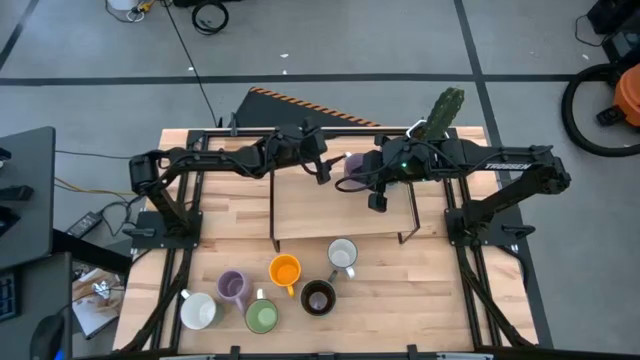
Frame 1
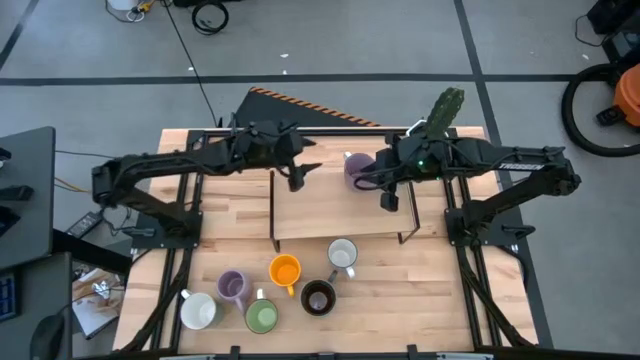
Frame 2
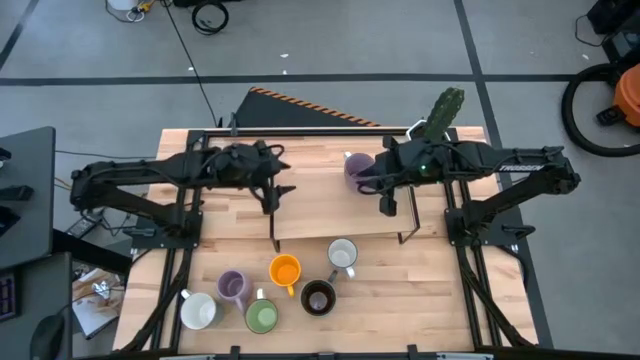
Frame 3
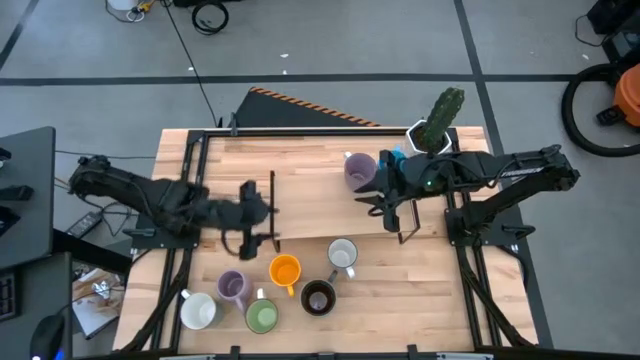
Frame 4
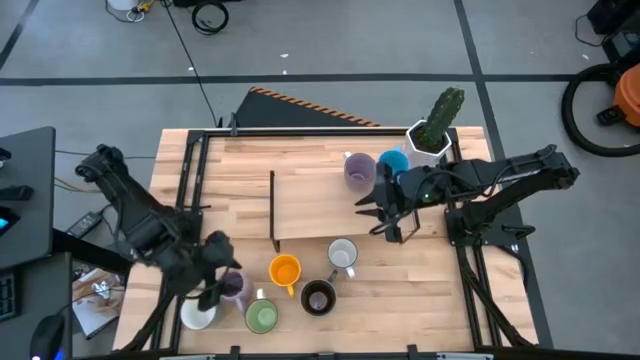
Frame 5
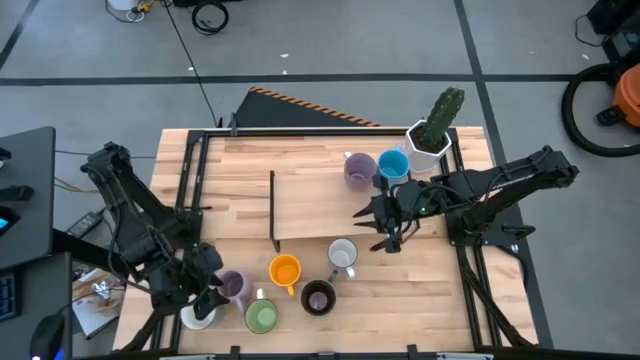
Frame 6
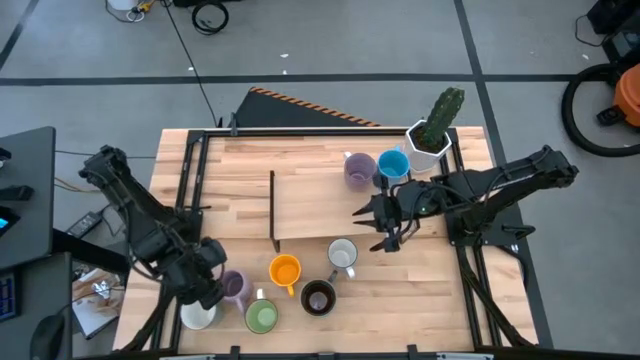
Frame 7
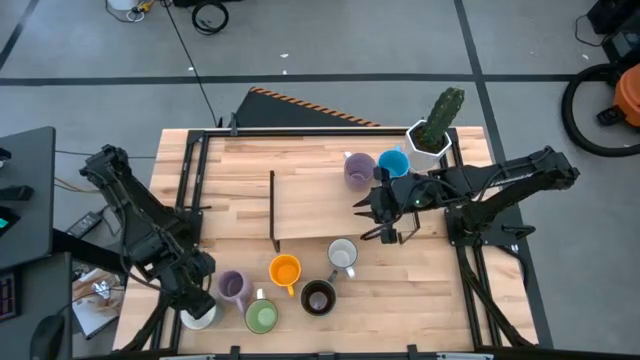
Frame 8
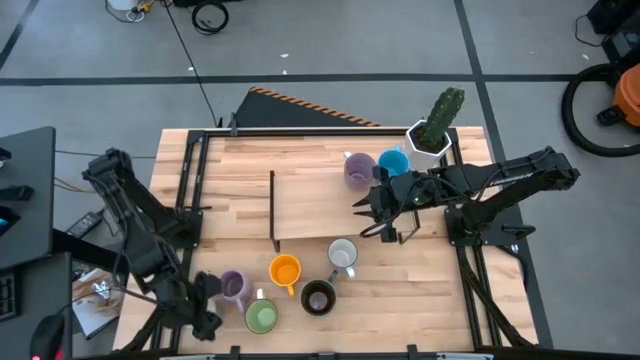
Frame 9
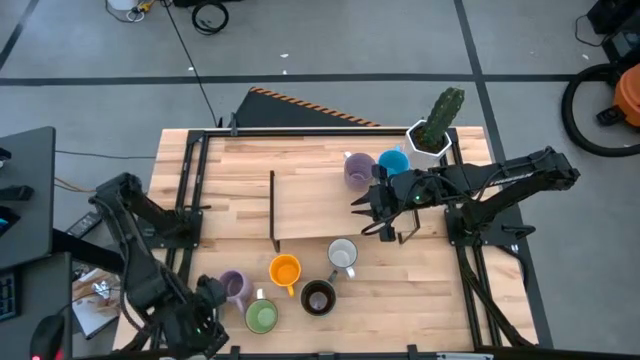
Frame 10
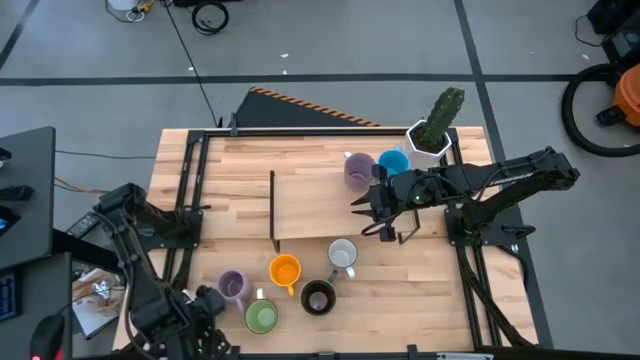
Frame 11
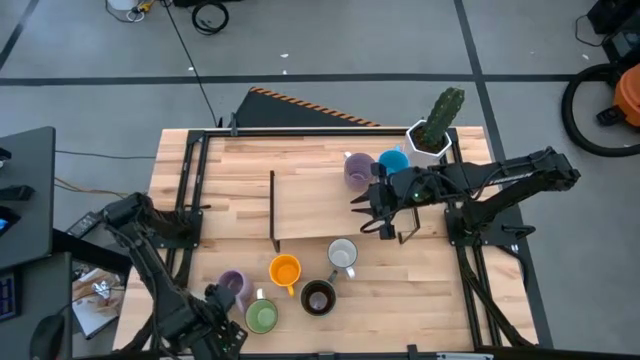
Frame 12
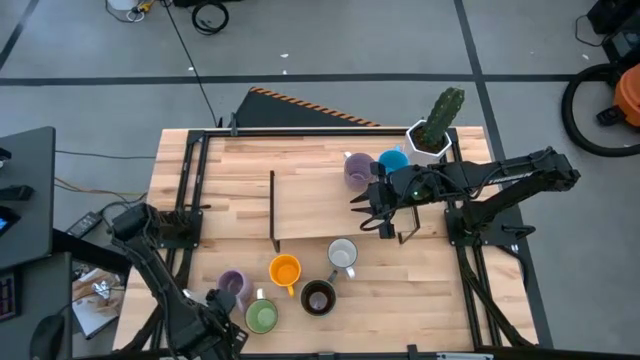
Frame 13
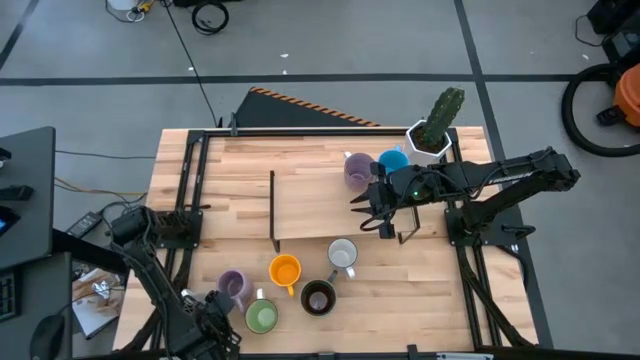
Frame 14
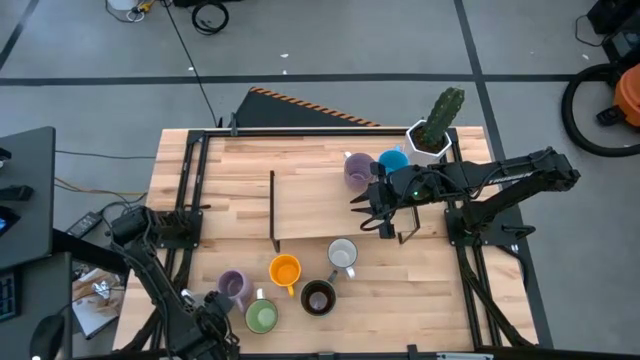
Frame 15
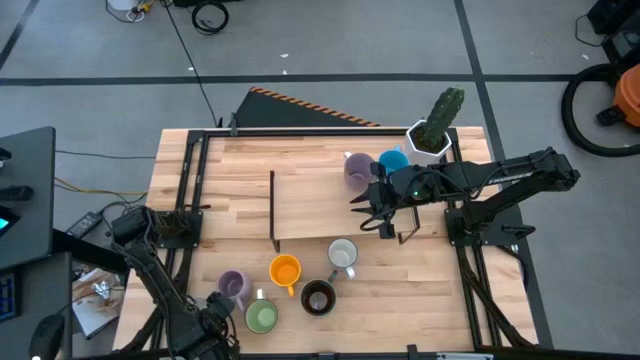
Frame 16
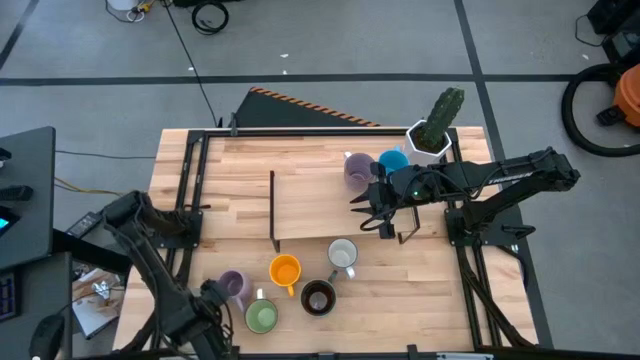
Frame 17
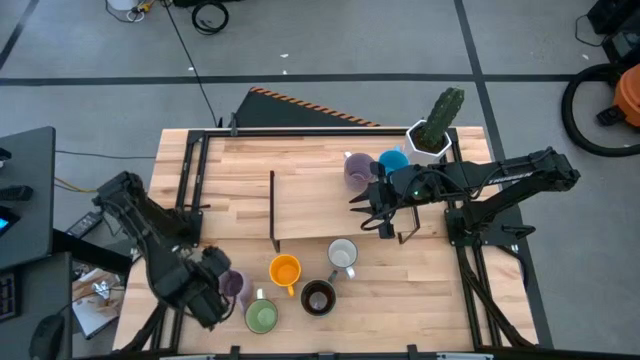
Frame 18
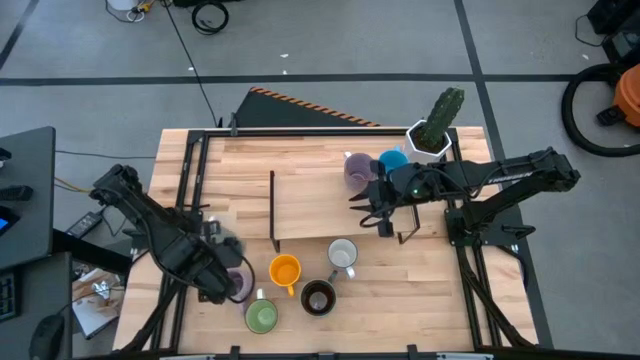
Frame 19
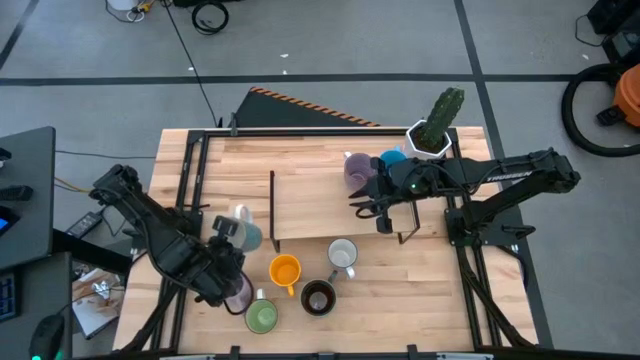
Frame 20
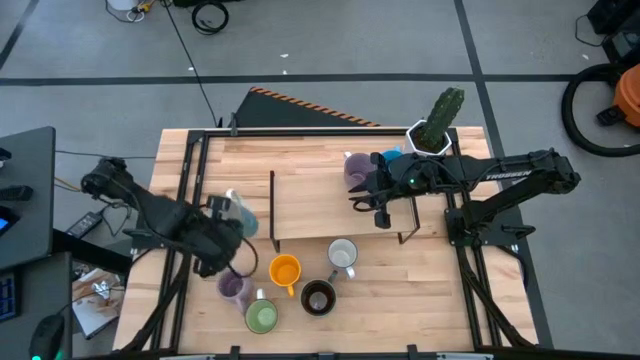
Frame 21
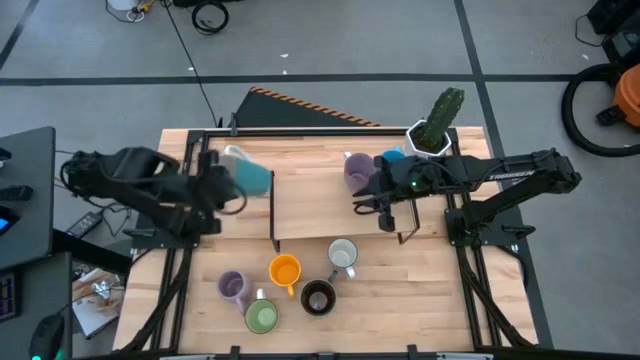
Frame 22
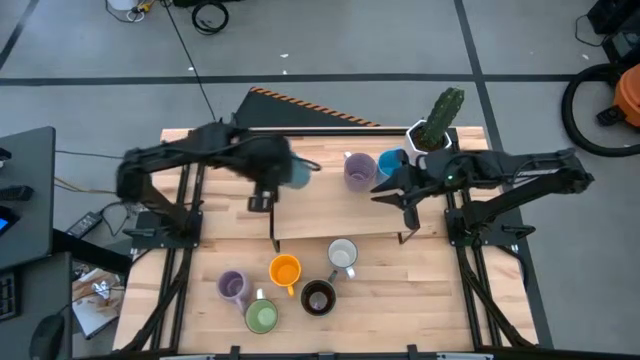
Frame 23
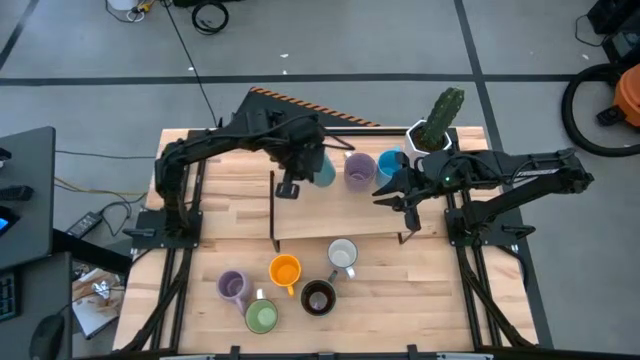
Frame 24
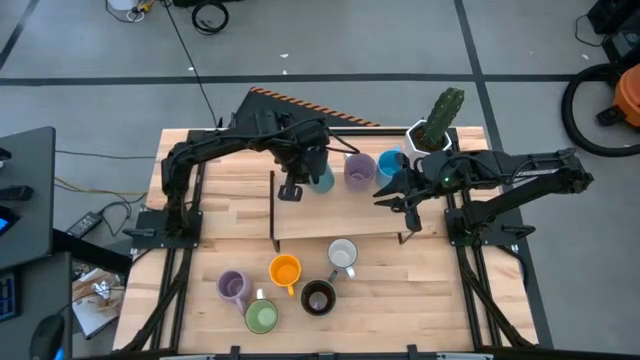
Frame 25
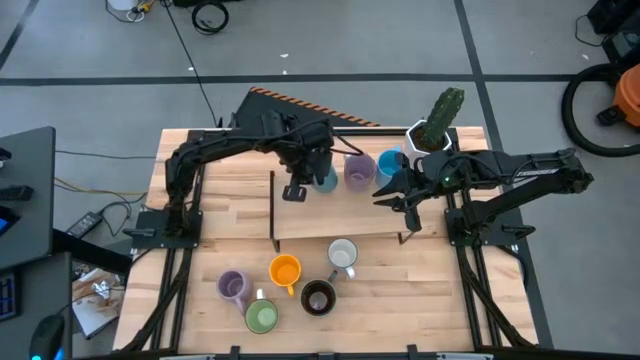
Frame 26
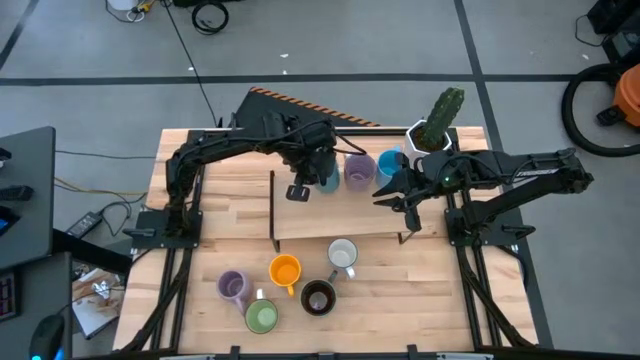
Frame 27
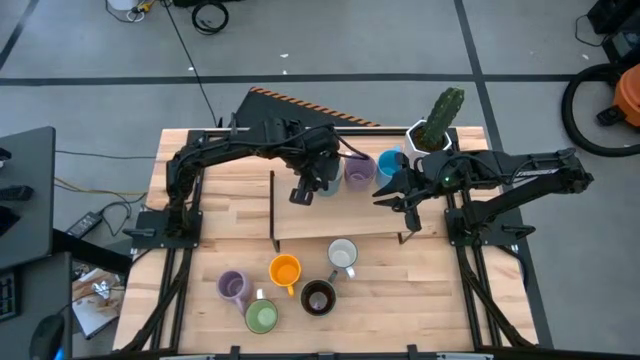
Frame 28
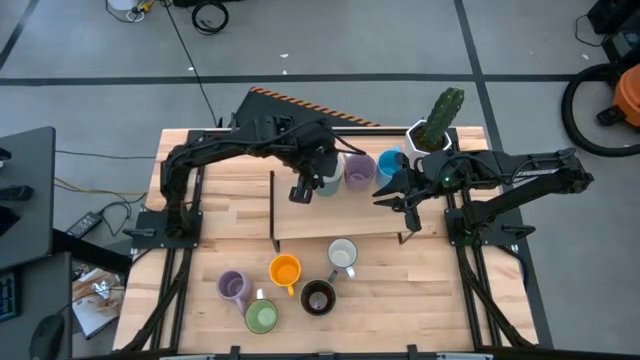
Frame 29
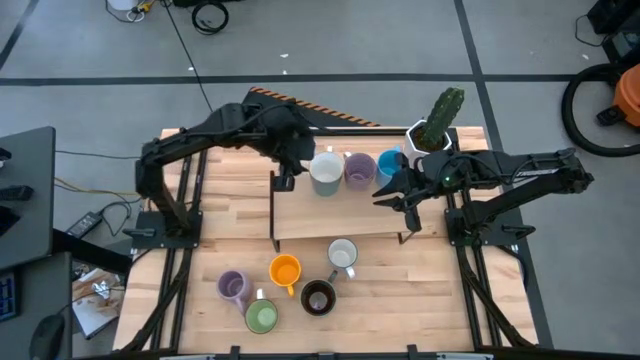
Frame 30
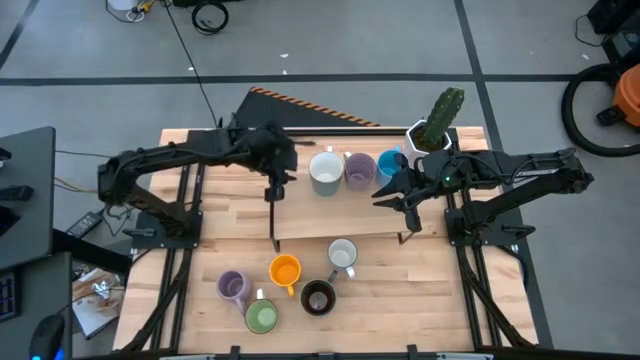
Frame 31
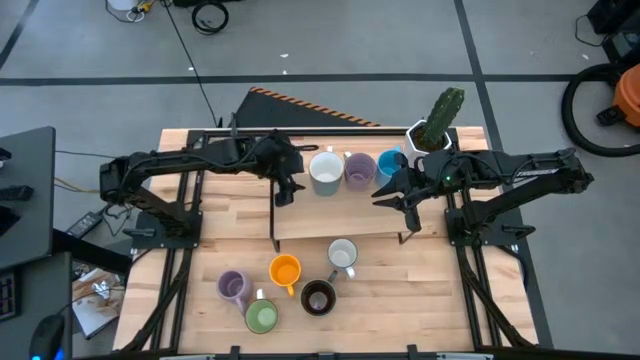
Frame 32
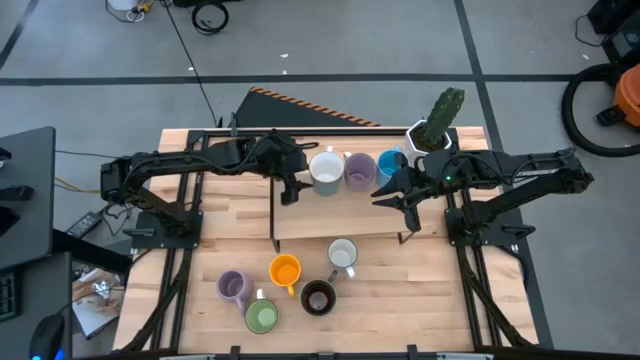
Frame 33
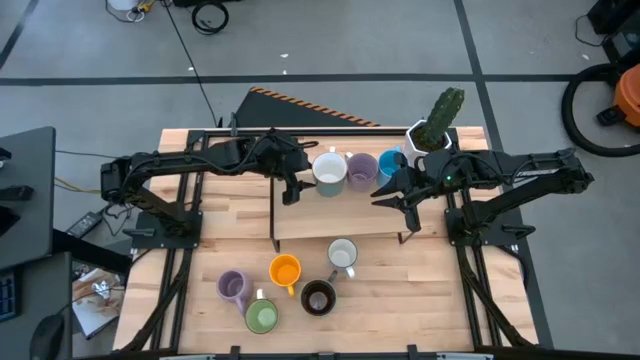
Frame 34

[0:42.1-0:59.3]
Task: Place coffee mugs
Put the light blue cup on the shelf

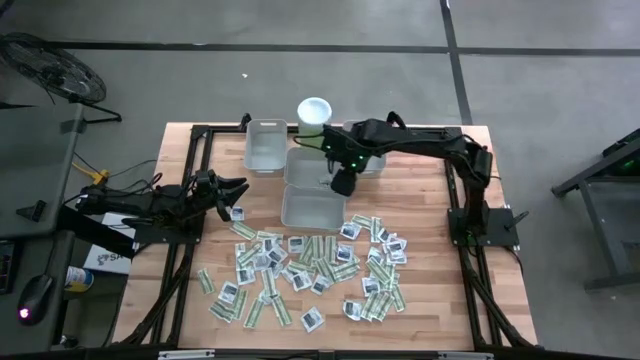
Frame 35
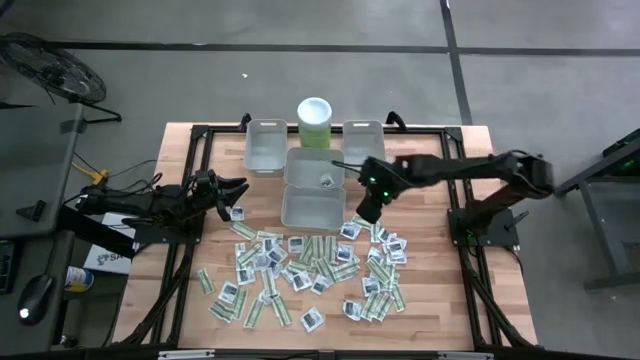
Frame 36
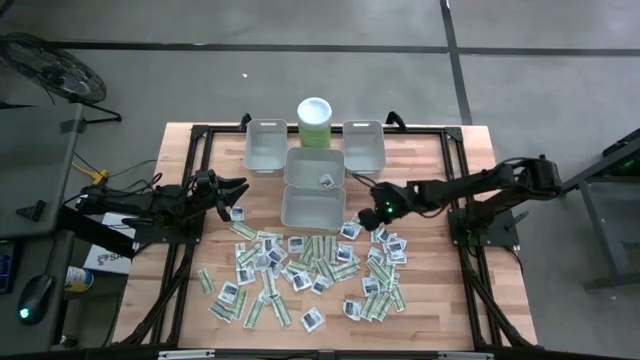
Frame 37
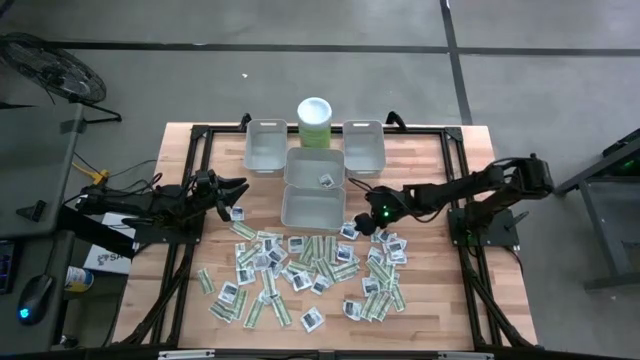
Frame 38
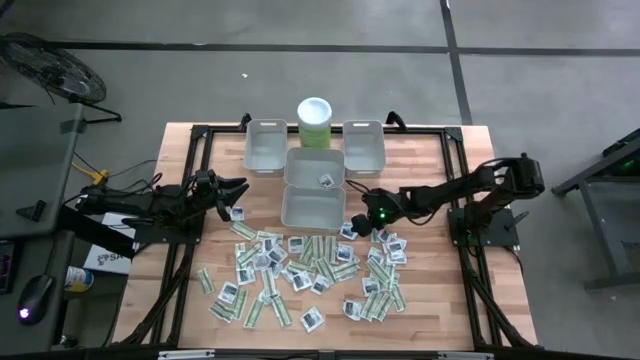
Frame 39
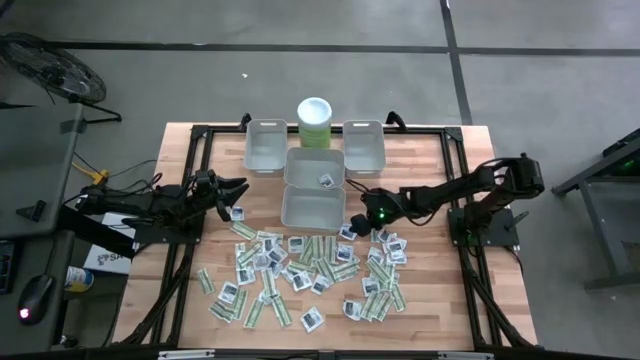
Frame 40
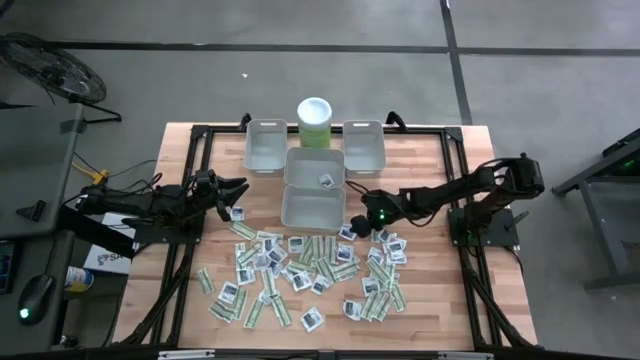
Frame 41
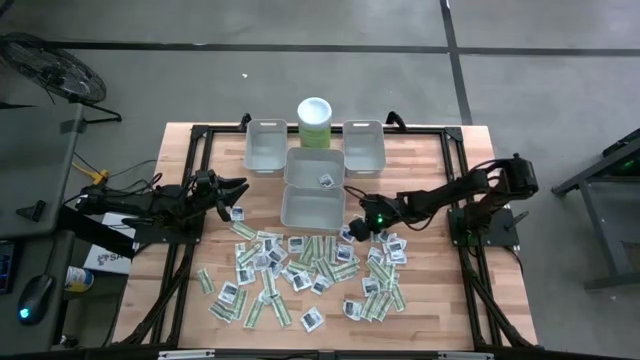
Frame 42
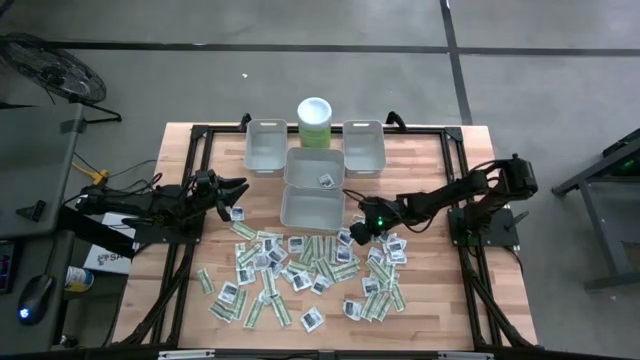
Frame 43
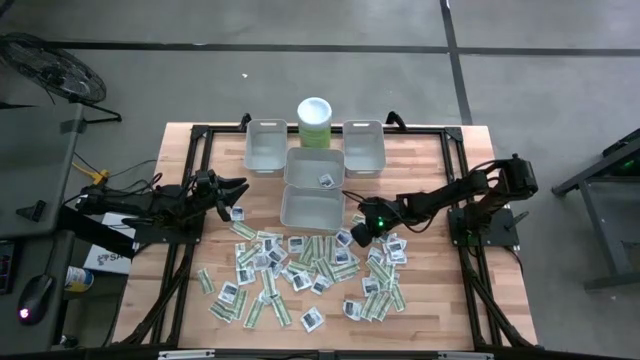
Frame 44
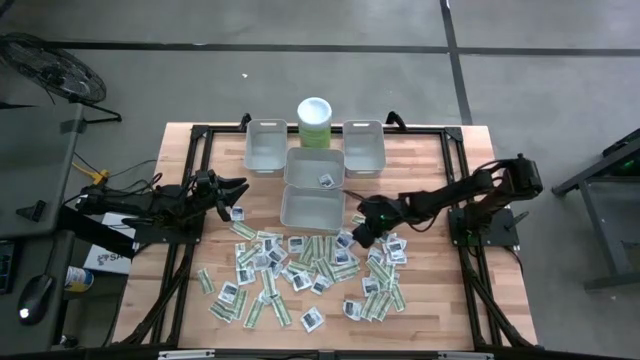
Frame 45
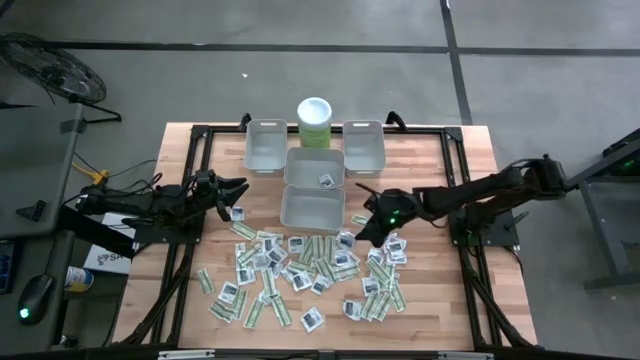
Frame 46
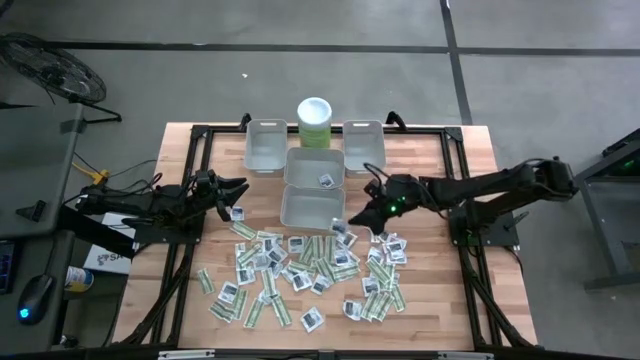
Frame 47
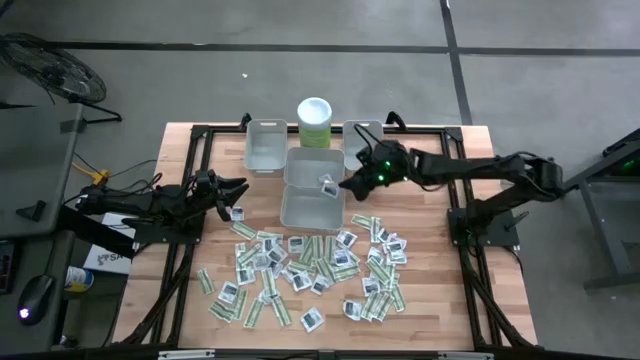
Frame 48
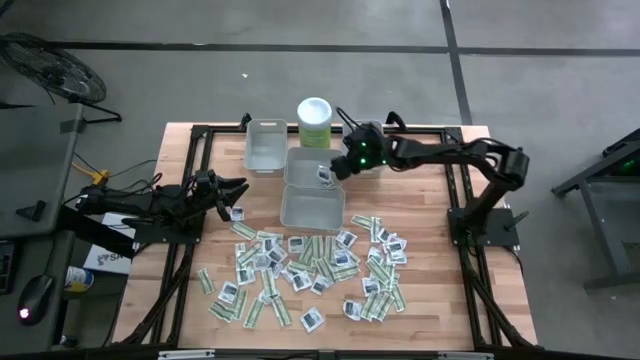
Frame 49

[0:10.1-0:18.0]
Task: Pick & Place First Aid Supplies
Put the alcohol pad into the top center bin
